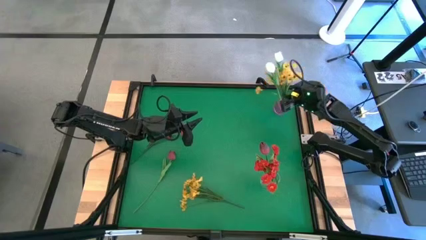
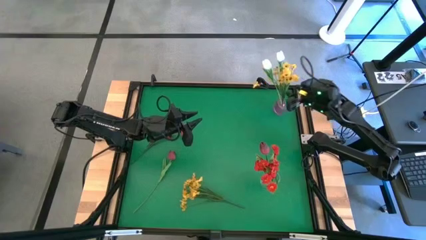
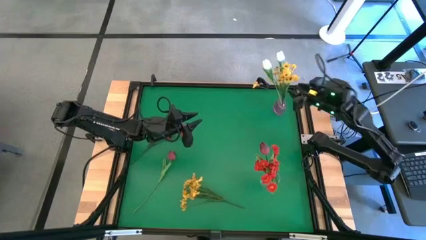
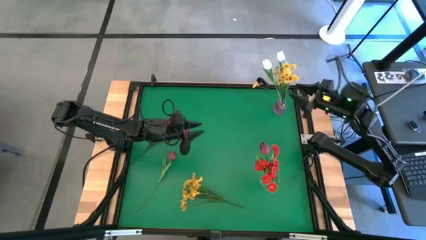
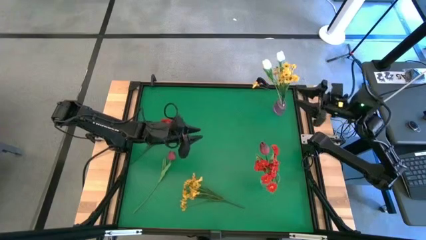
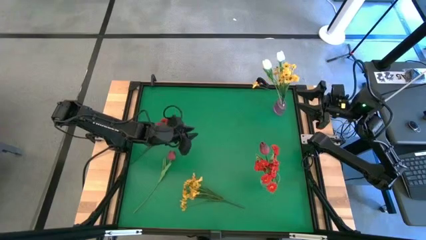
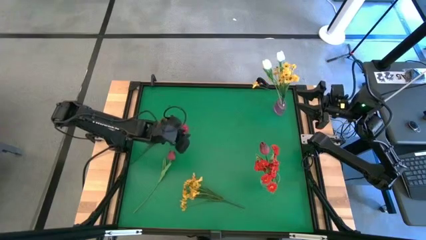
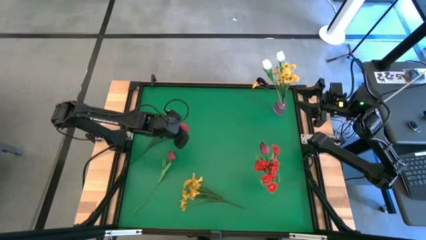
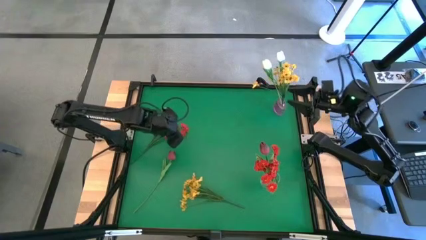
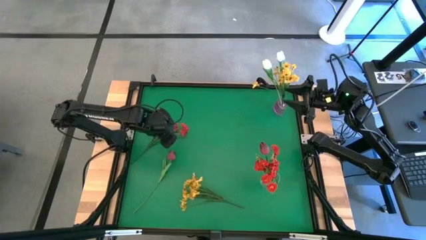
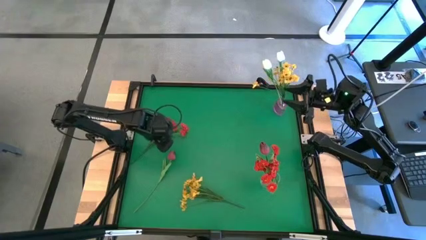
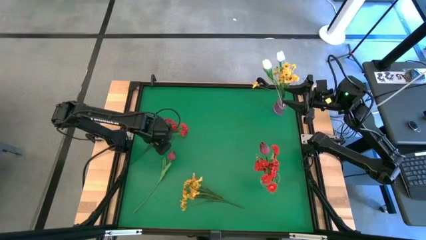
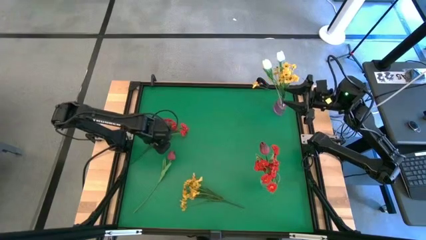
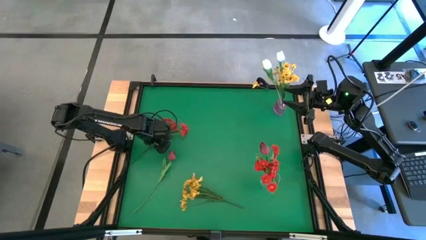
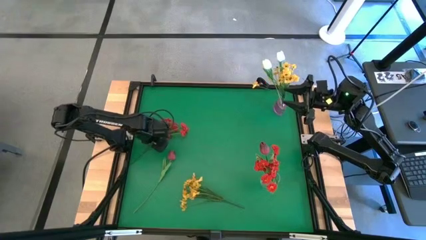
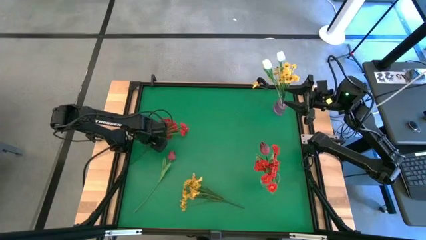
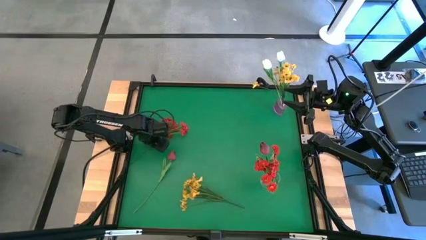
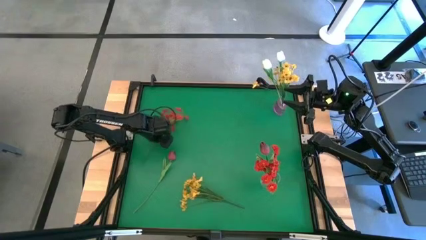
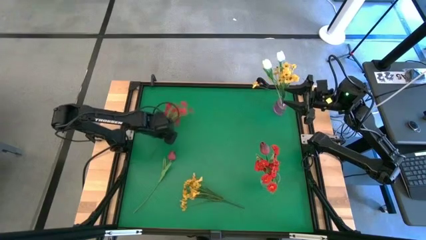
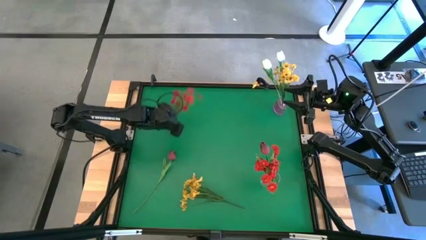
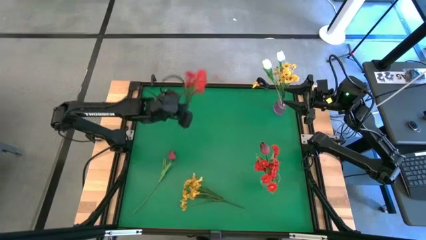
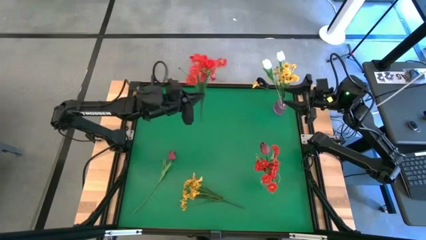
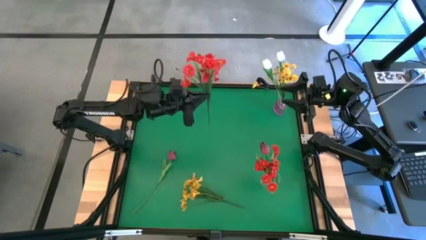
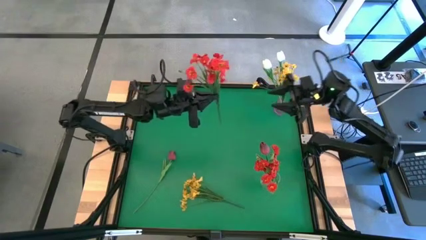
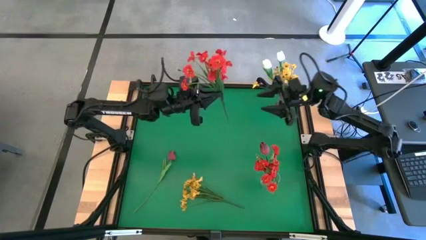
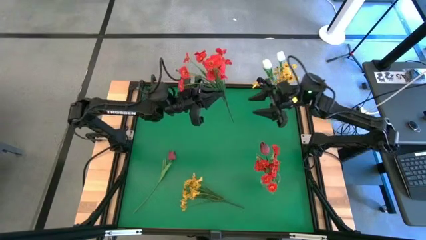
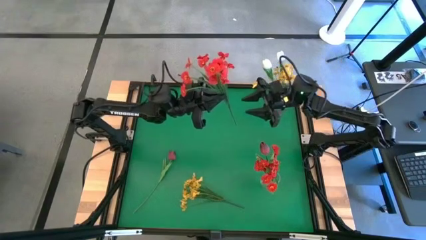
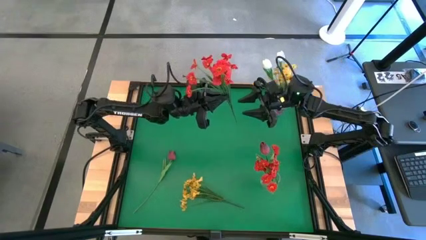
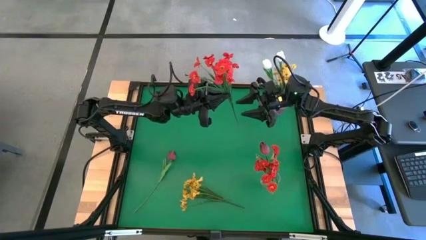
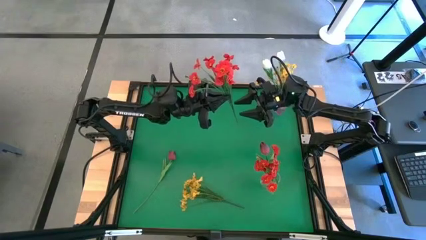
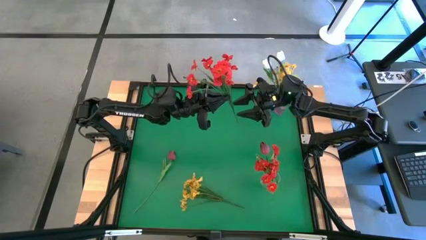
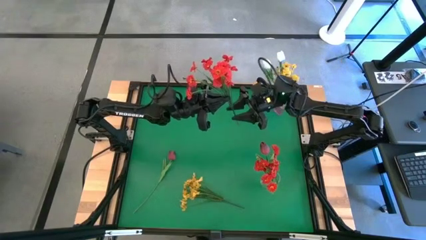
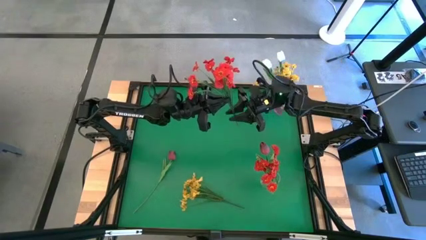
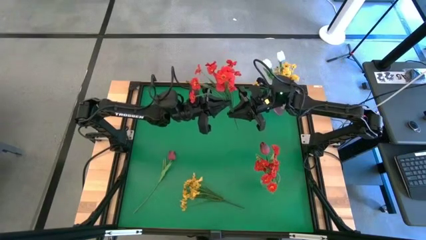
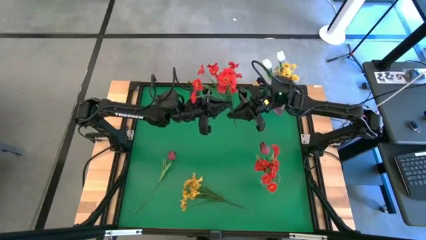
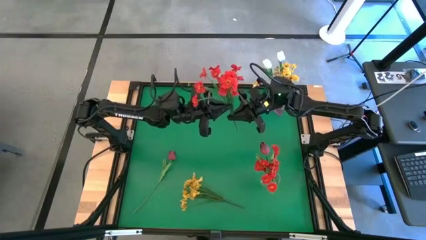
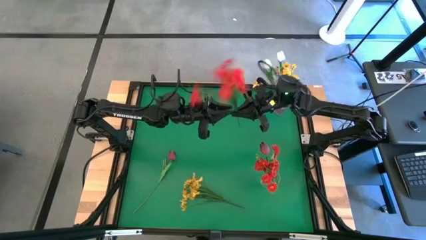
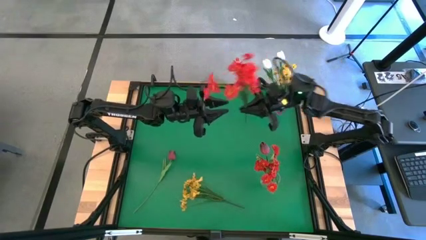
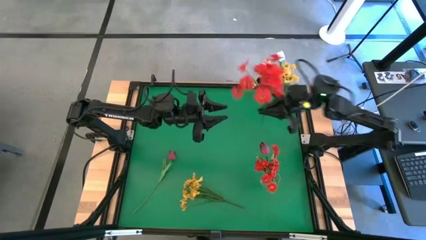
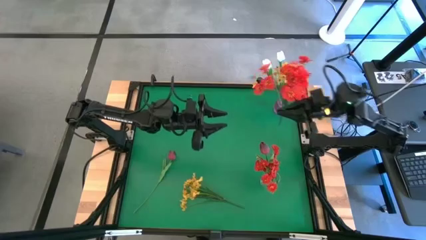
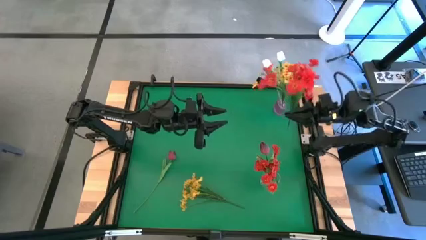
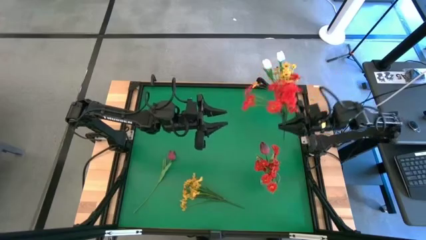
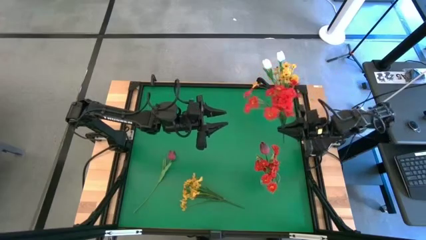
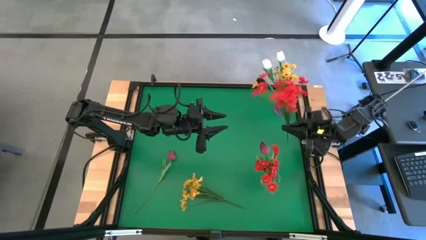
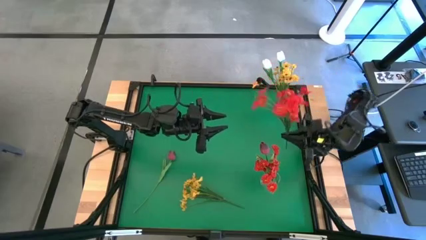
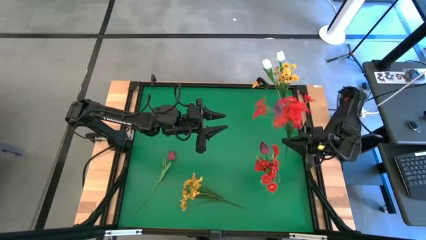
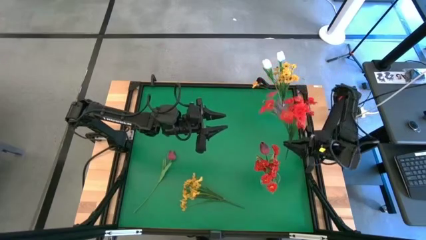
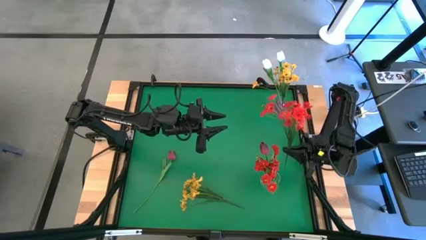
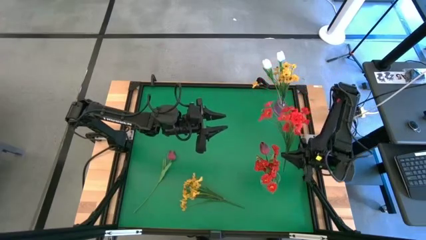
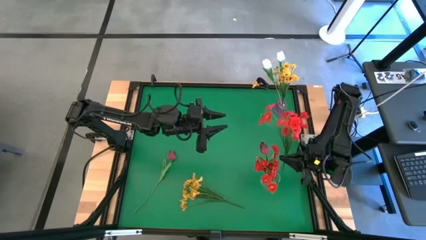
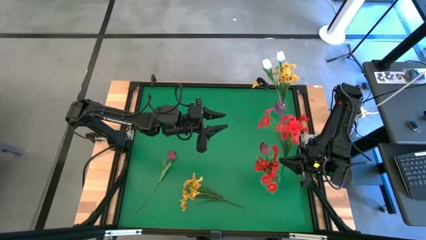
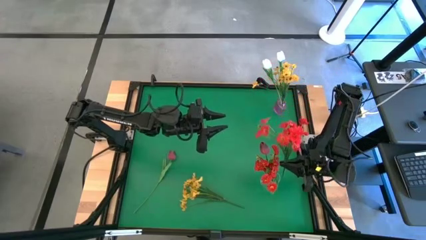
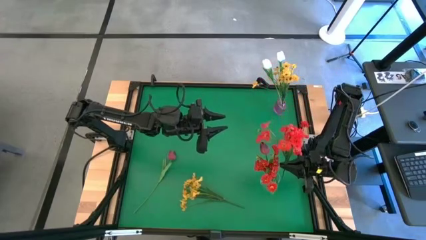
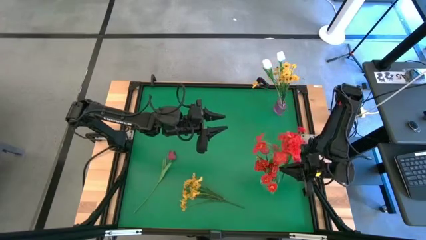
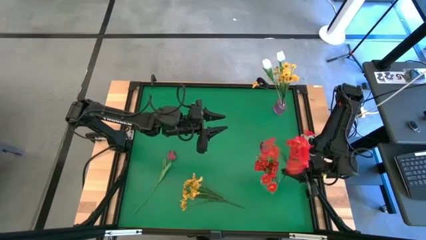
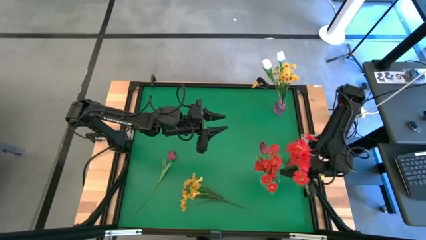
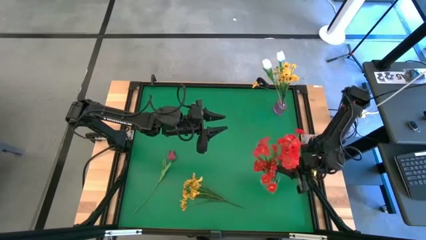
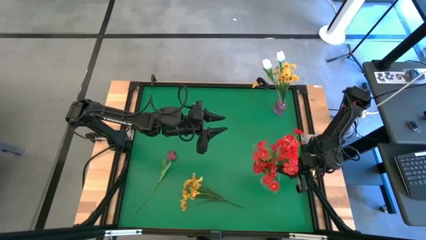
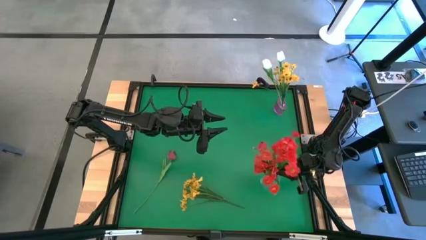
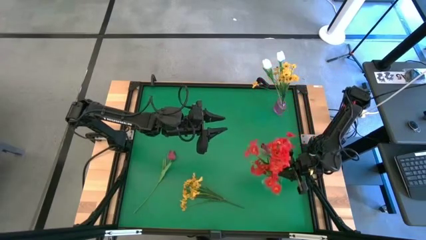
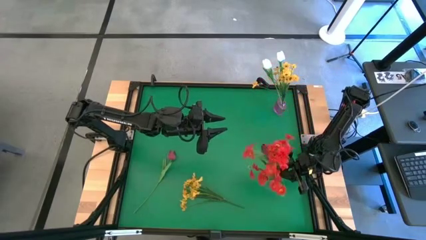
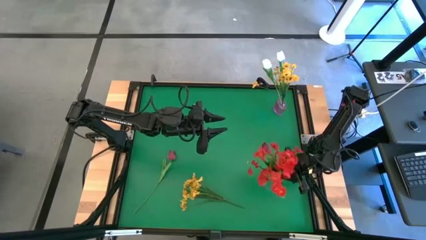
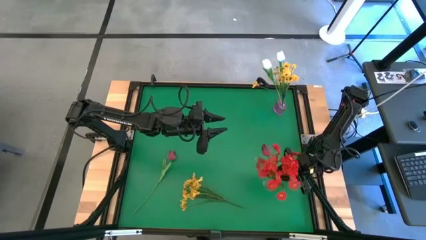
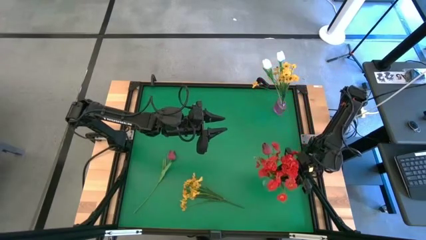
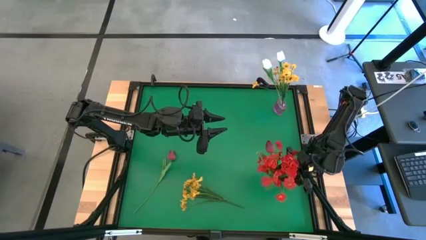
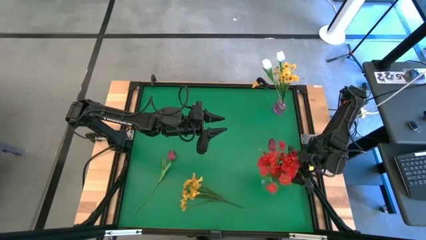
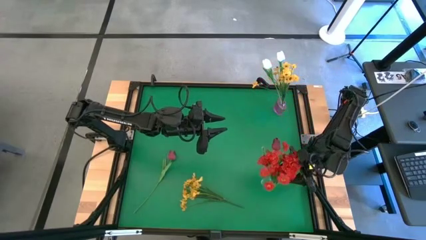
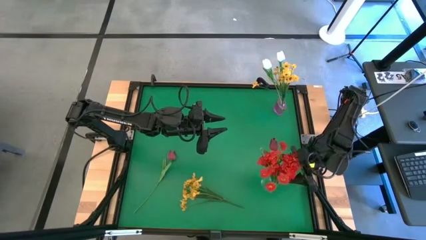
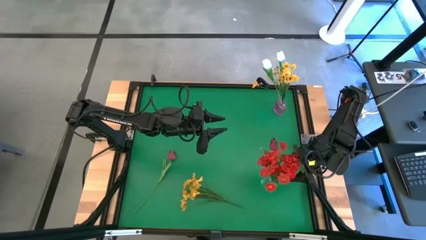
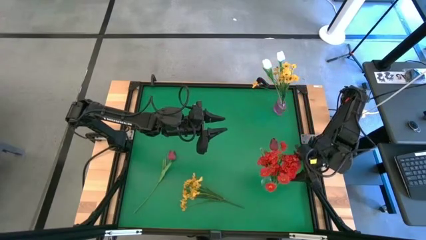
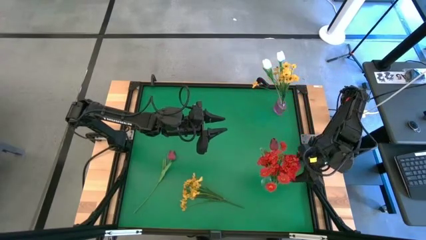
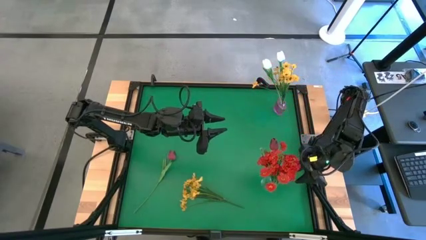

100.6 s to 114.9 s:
Task: Sort flowers into vase by color
Put the orange flowers into the transparent vase

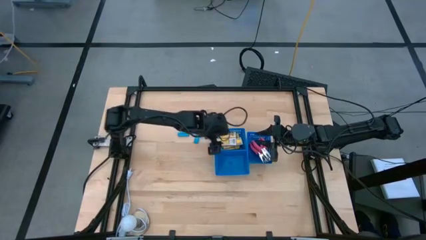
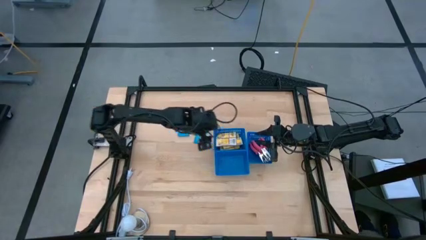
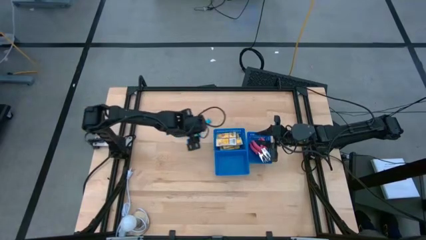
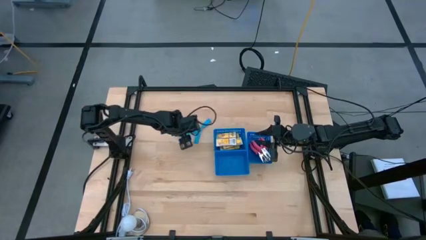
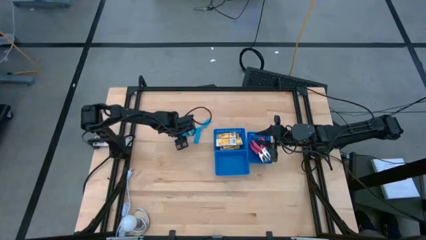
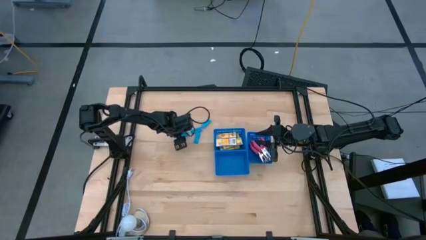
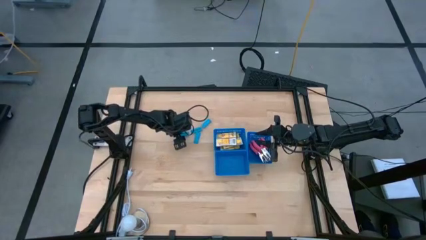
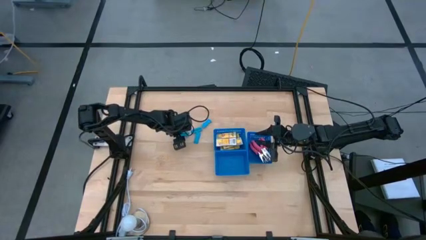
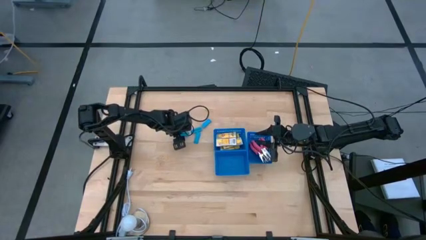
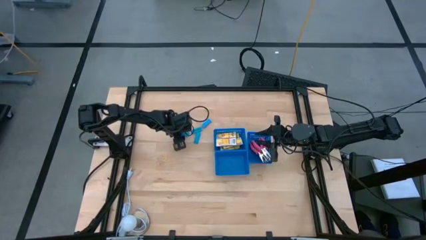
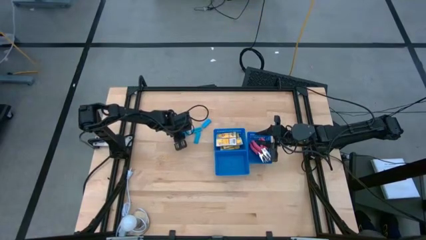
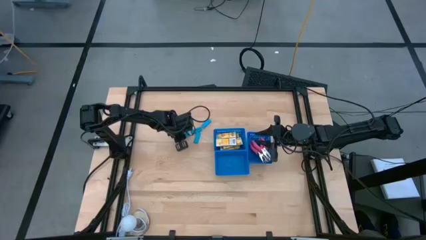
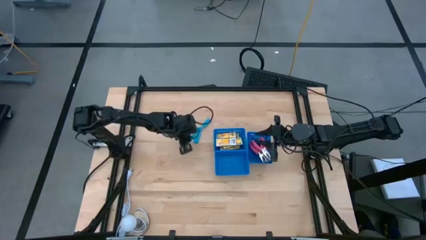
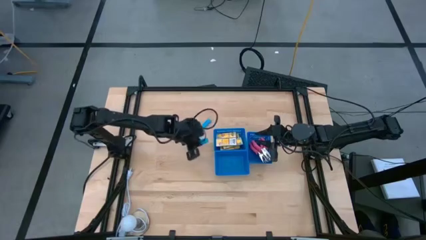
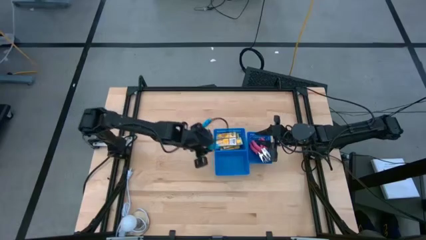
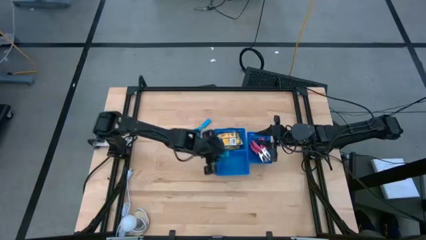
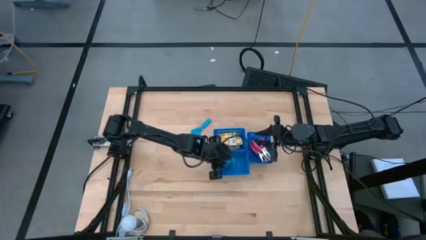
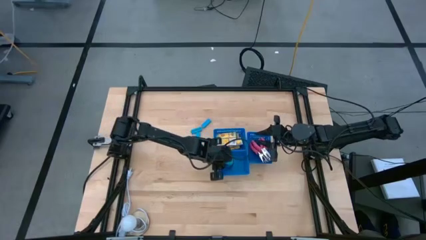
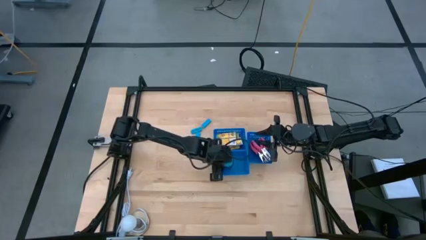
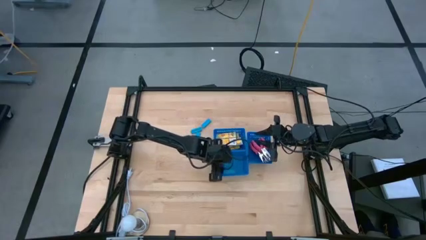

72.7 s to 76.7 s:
Task: Pick & Place School Supplies
Put the left blue eraser into the bottom horizontal blue bin
